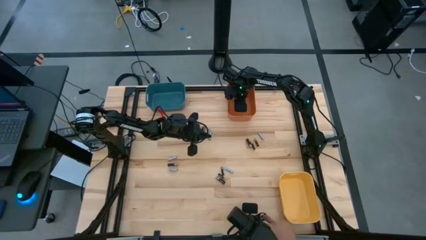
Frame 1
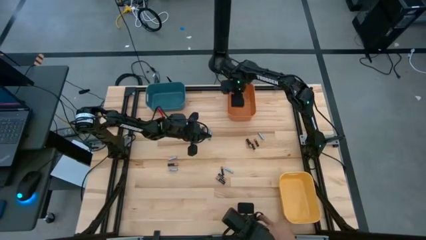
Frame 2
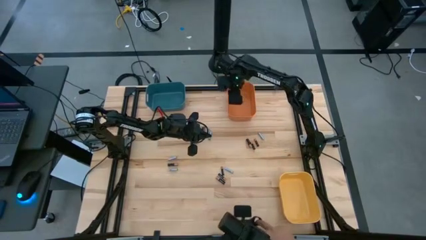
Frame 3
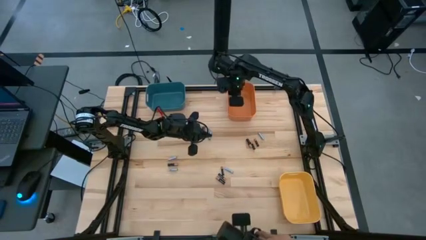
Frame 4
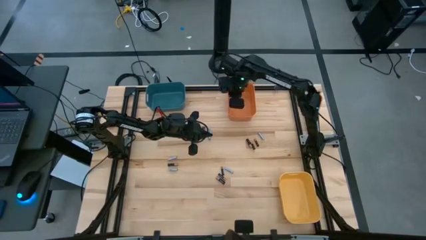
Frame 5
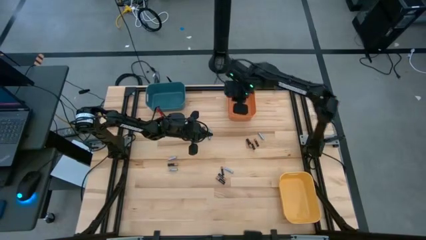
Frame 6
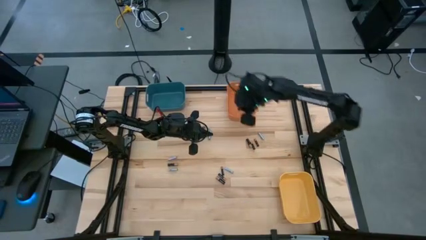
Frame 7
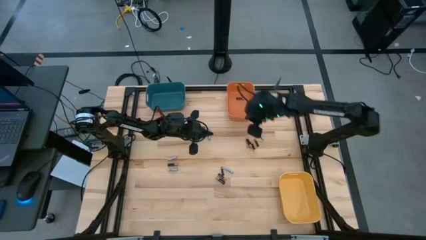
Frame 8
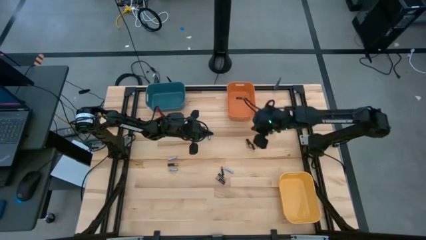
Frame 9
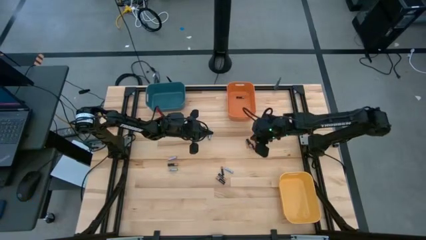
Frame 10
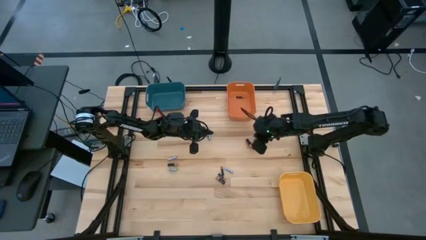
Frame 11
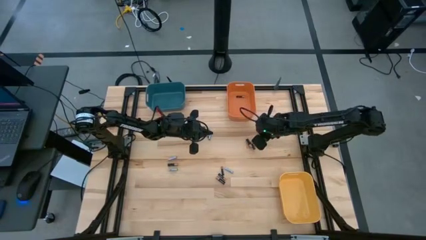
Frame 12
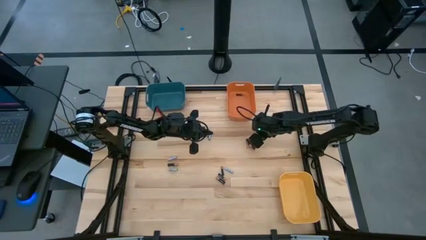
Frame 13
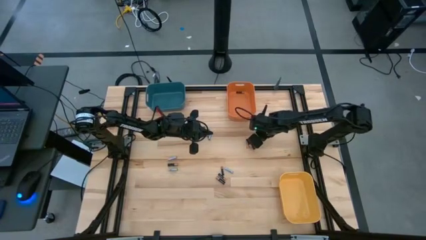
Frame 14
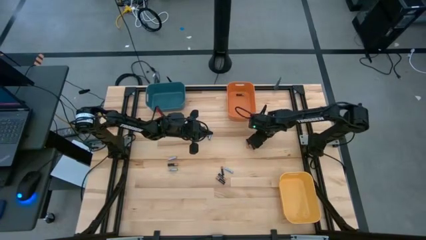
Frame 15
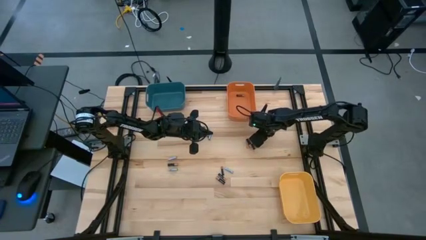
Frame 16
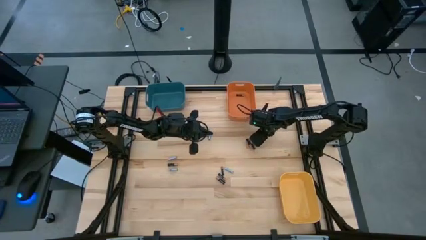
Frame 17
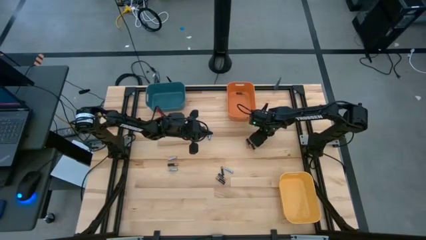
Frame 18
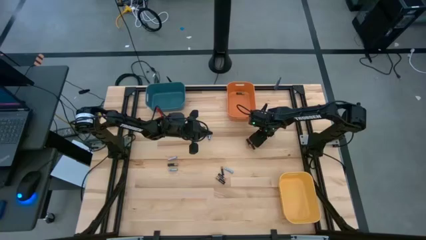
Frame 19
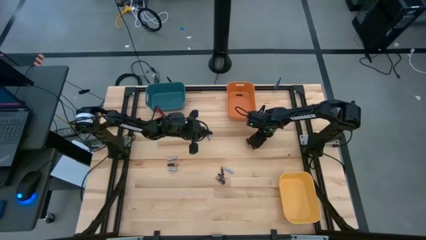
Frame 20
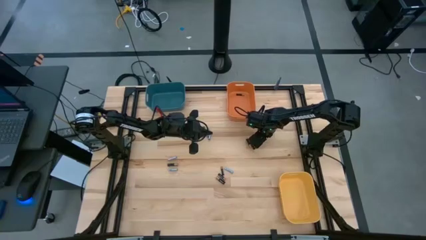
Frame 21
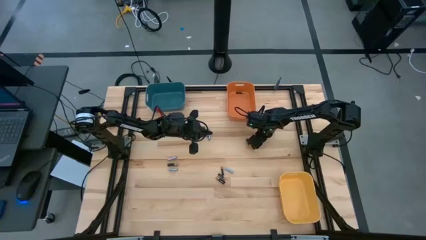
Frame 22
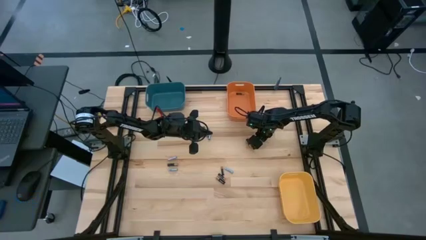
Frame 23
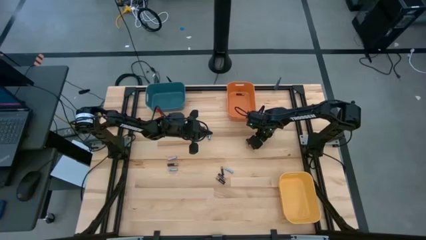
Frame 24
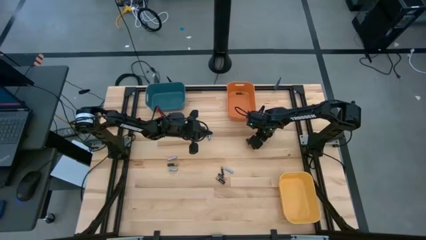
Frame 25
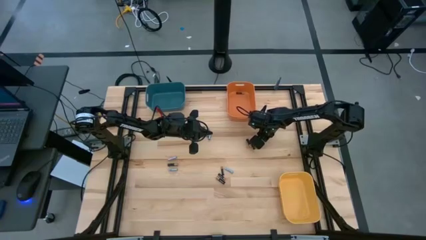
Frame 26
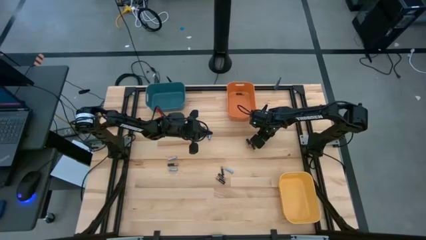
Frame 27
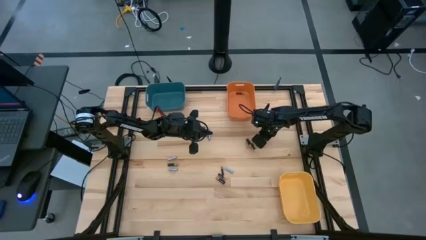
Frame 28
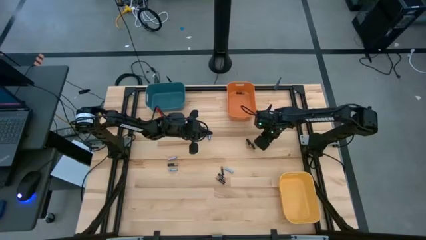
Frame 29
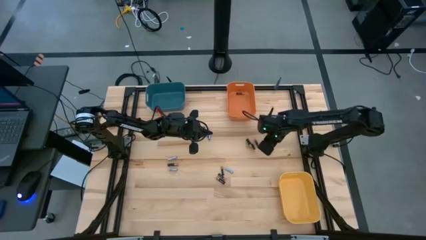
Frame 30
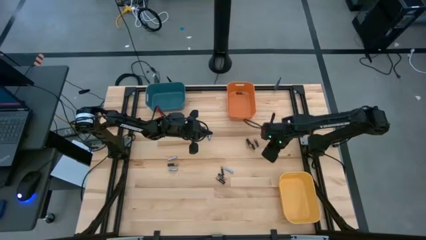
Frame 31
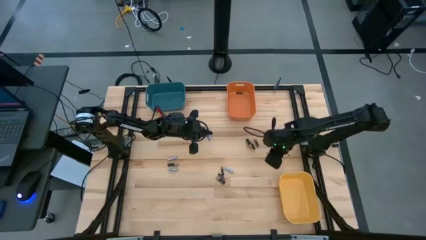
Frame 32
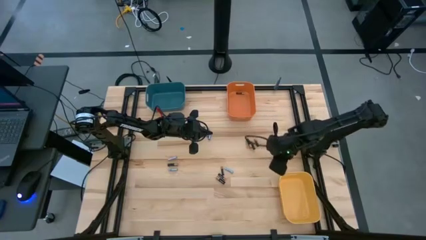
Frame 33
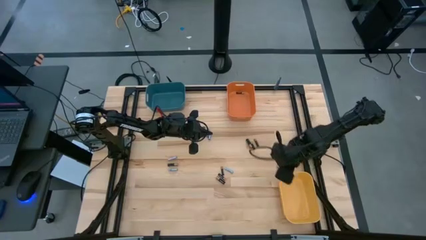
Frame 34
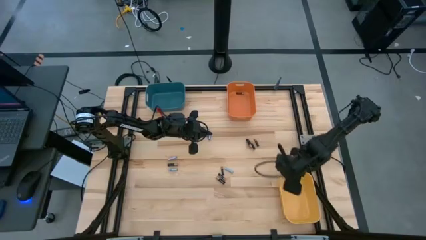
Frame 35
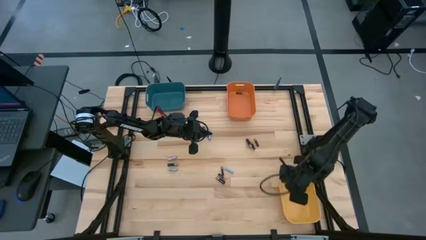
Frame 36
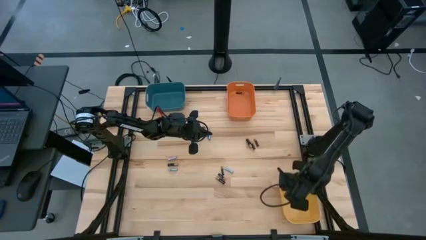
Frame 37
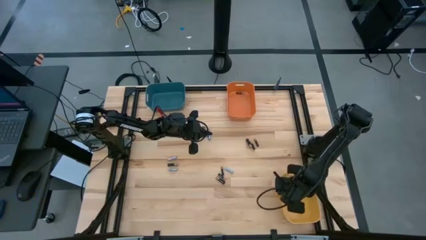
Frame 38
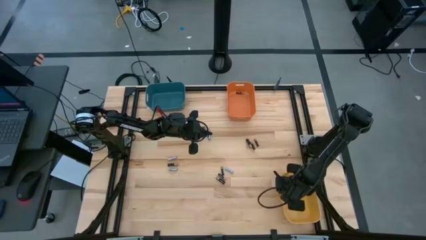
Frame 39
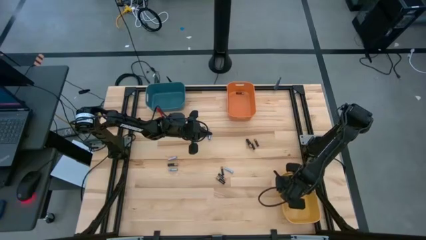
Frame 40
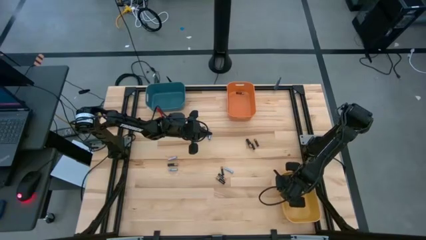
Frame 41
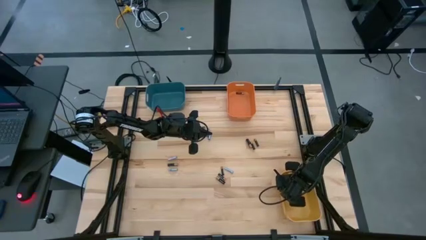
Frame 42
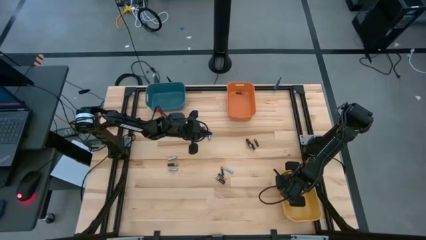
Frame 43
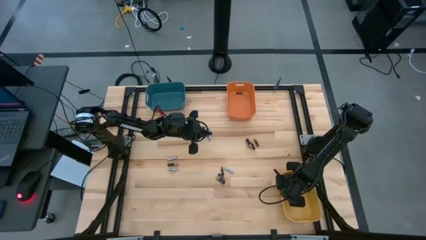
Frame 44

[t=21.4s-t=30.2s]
Task: Sort batteries
Put the silver battery into the yellow bin

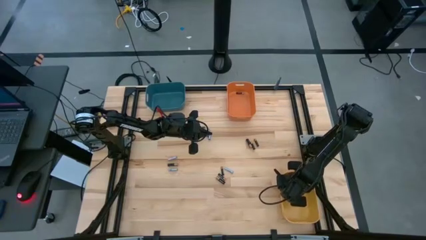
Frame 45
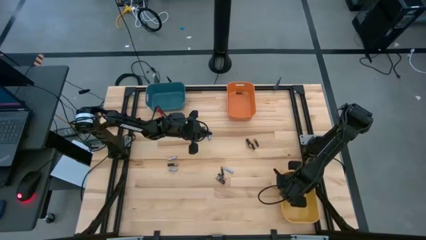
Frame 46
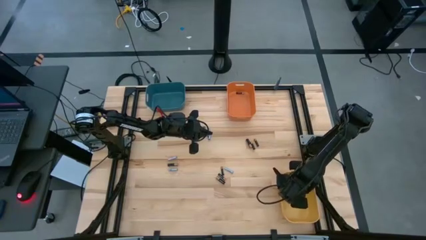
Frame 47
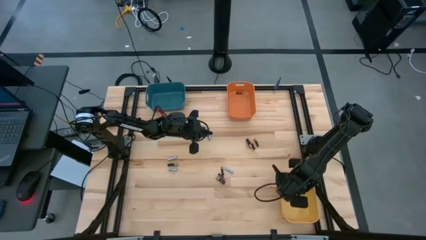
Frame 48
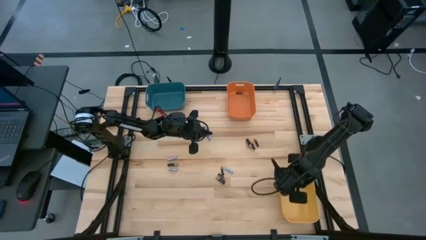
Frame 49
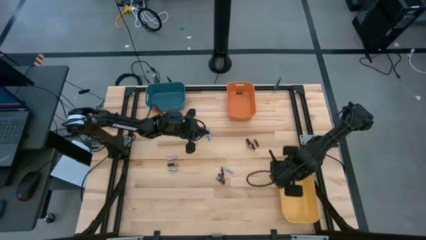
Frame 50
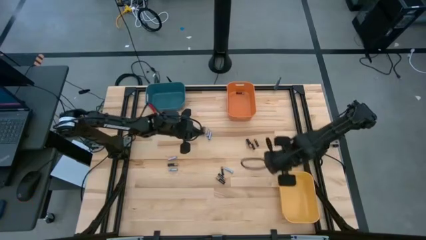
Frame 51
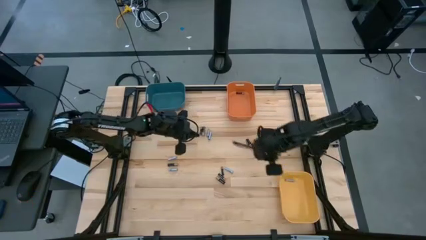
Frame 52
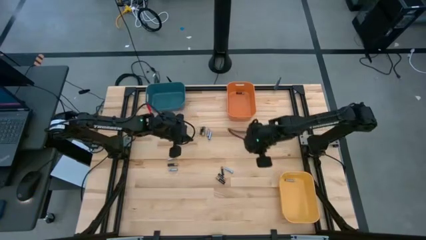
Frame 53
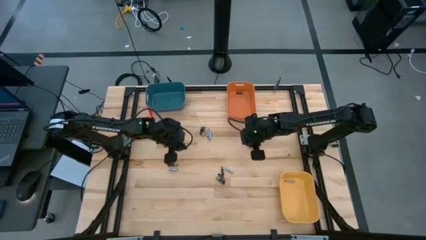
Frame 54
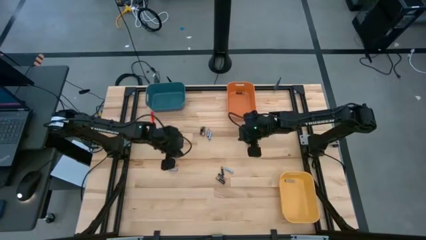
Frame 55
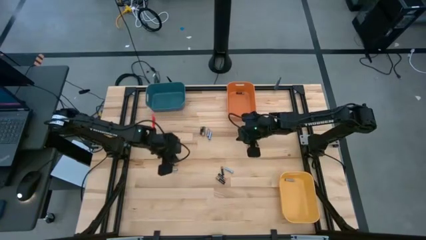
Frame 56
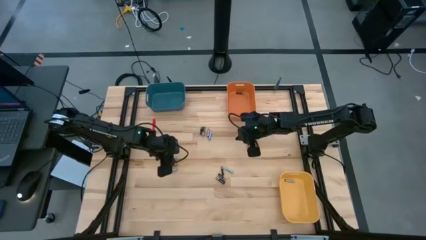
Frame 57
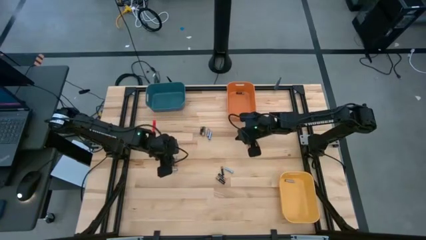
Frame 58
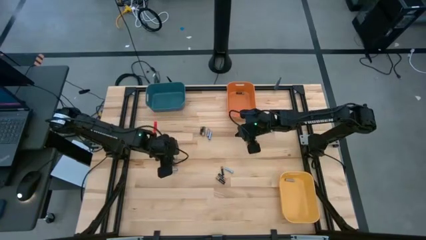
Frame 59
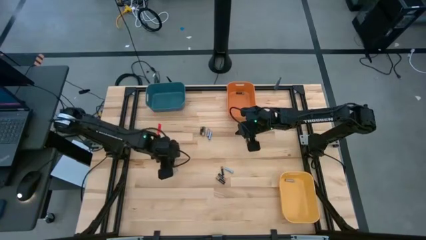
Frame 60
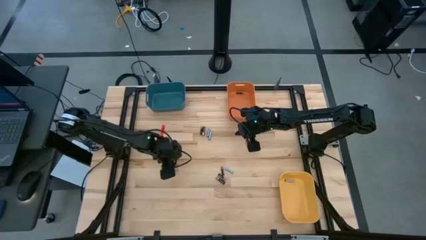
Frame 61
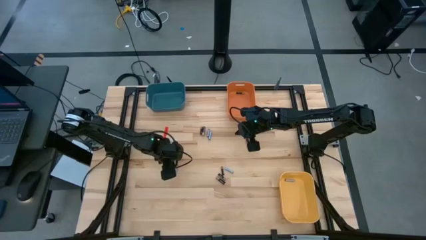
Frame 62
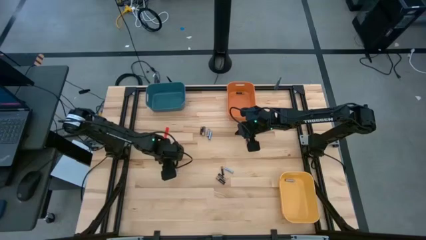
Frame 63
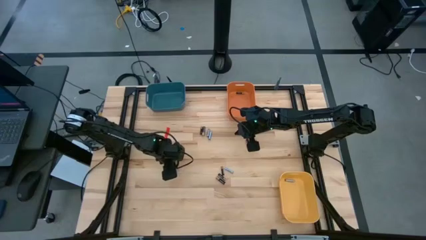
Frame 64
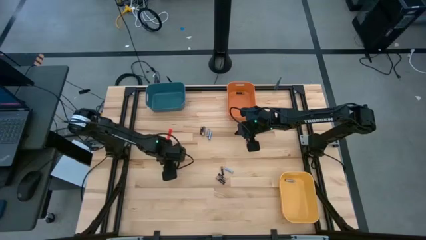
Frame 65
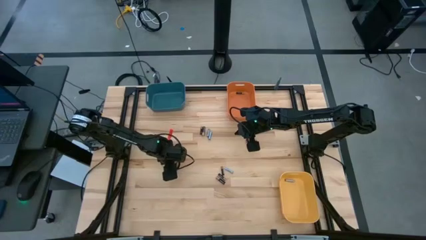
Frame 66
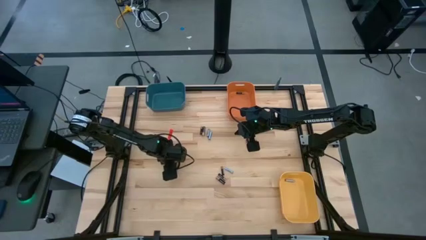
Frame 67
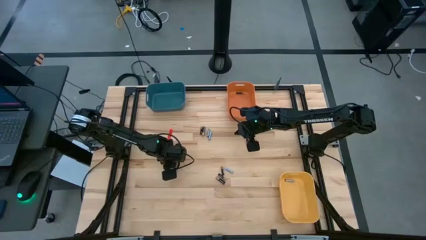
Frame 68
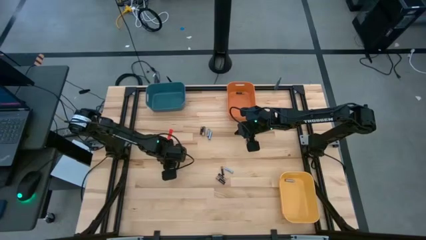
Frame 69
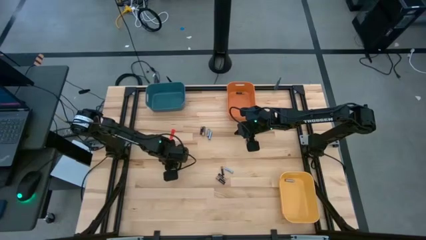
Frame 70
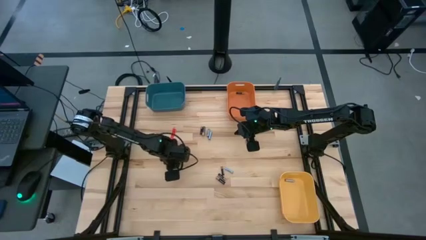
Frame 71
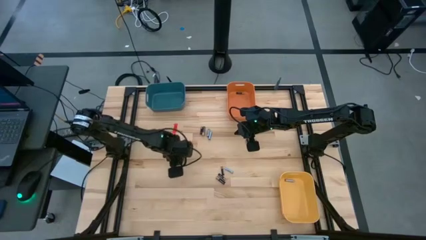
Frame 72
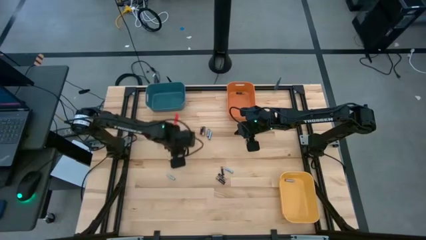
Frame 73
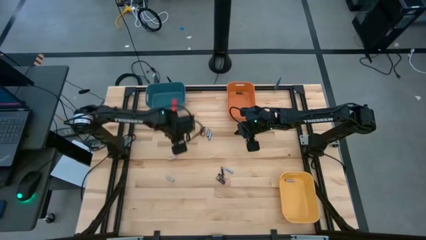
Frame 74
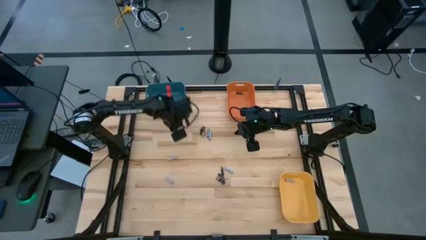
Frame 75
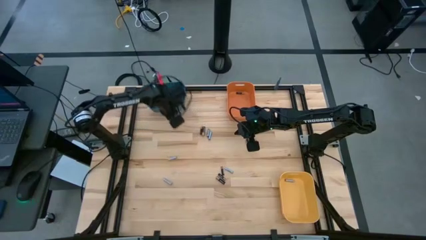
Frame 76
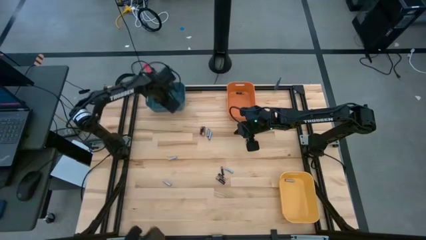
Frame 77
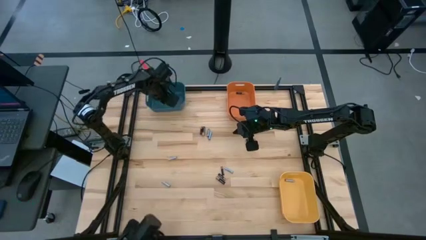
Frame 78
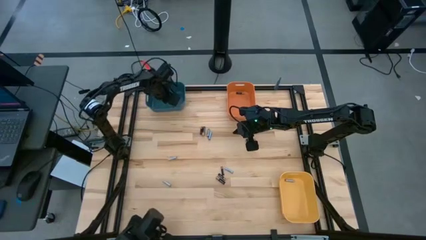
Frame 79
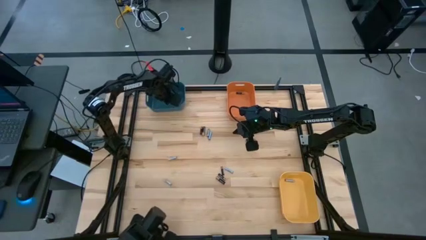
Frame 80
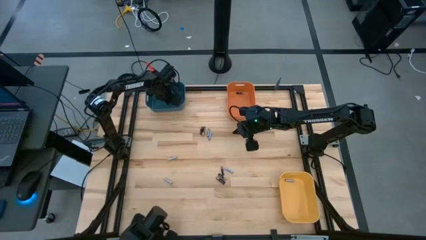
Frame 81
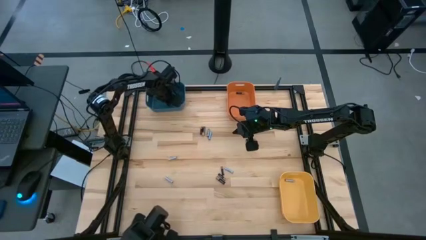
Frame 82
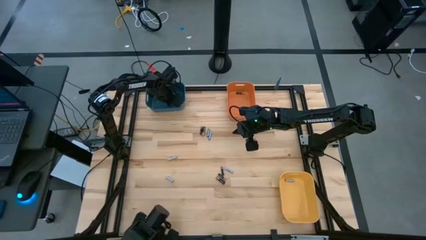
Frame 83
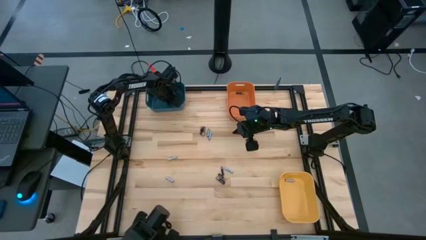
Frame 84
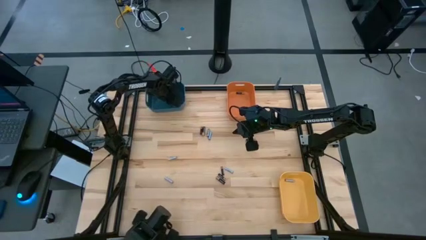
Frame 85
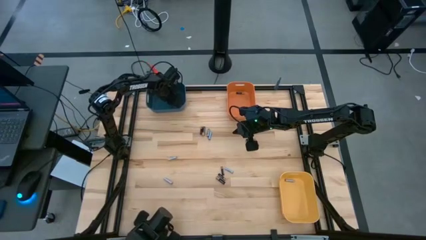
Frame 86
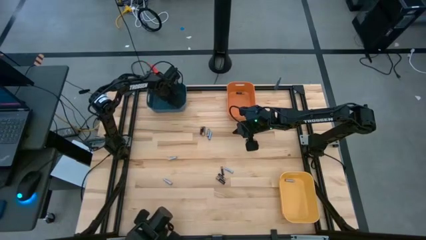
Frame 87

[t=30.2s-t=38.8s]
Put the big black battery into the blue bin
